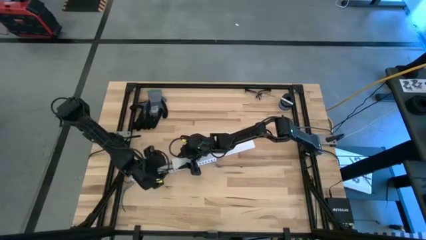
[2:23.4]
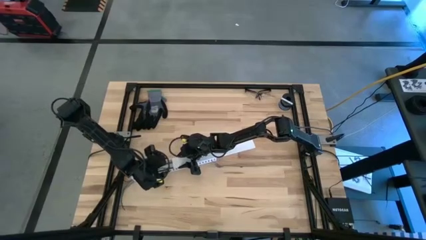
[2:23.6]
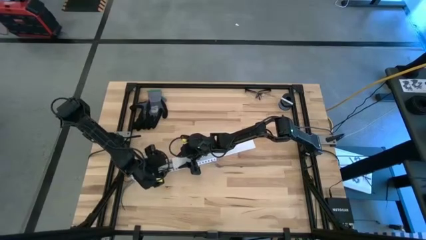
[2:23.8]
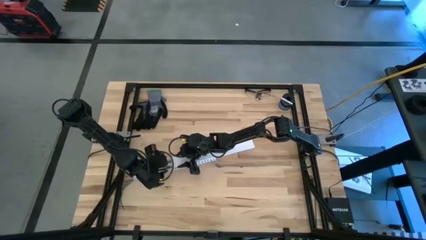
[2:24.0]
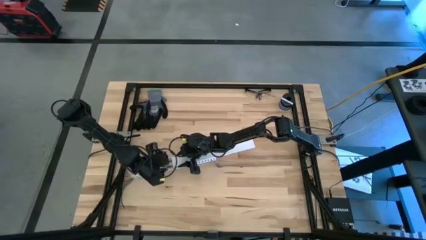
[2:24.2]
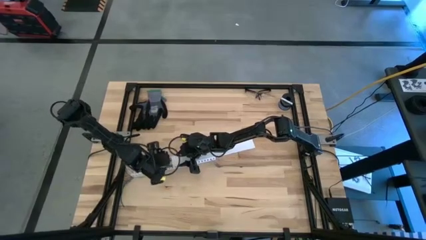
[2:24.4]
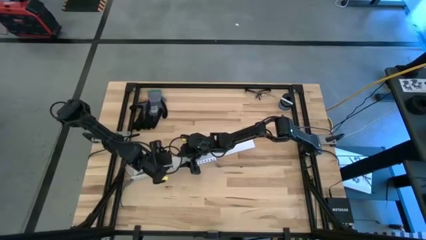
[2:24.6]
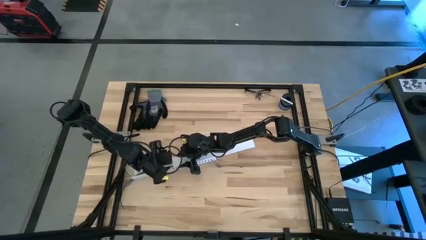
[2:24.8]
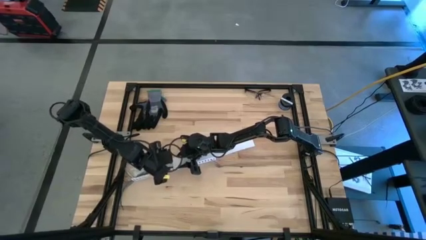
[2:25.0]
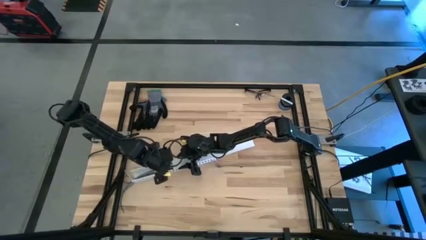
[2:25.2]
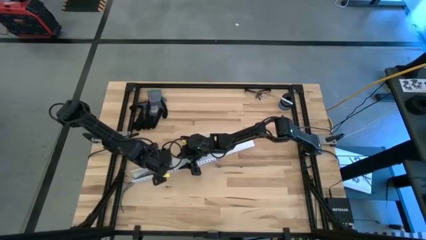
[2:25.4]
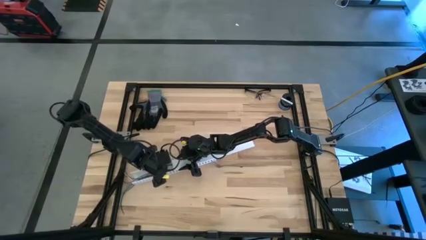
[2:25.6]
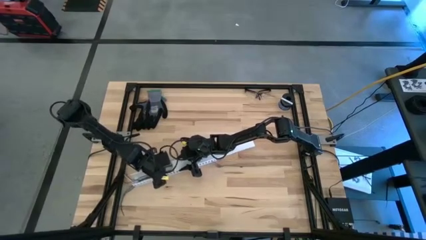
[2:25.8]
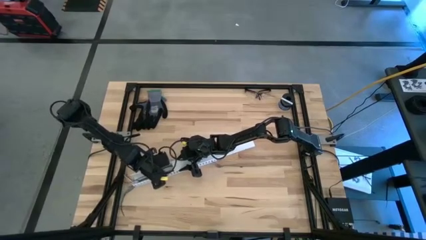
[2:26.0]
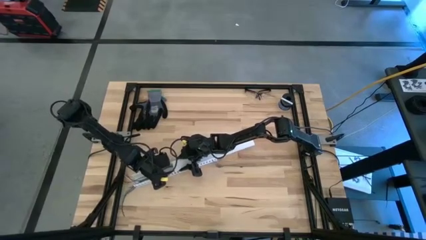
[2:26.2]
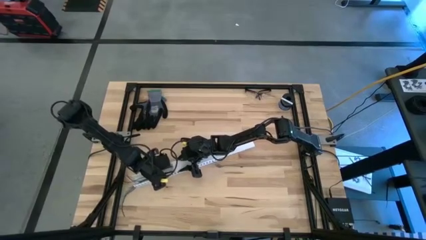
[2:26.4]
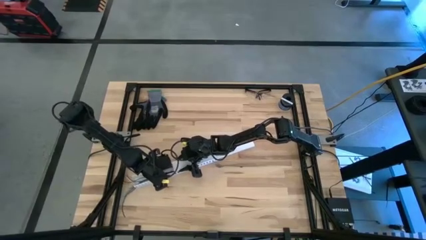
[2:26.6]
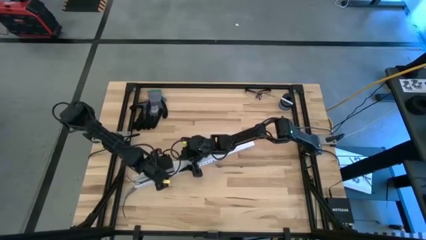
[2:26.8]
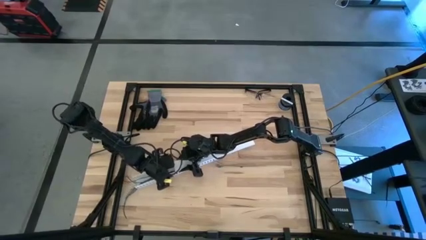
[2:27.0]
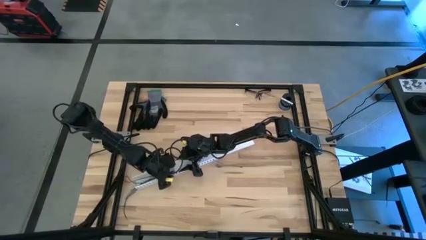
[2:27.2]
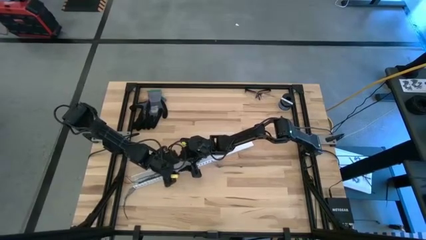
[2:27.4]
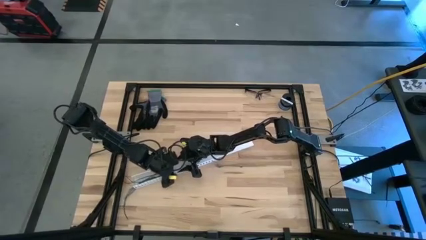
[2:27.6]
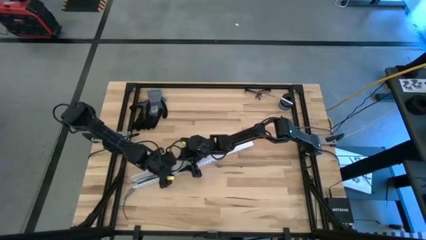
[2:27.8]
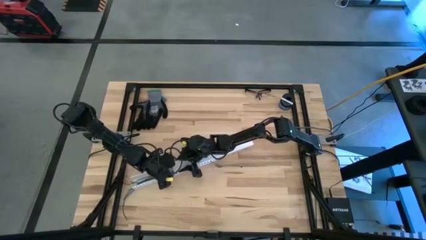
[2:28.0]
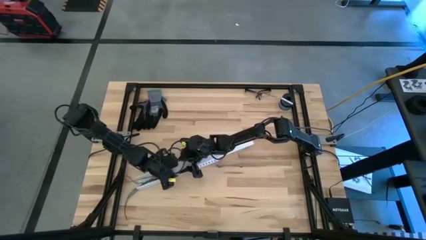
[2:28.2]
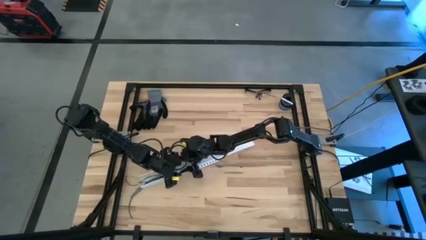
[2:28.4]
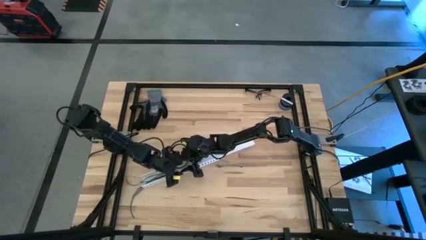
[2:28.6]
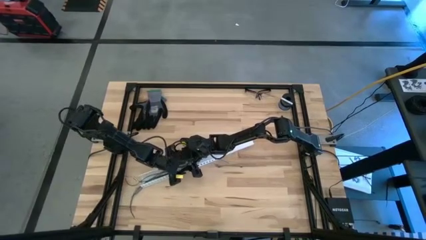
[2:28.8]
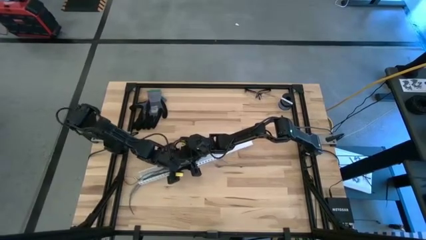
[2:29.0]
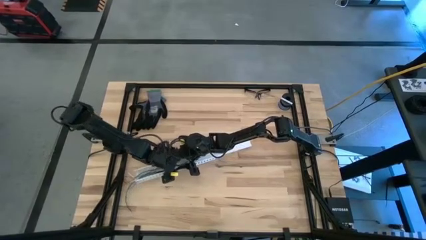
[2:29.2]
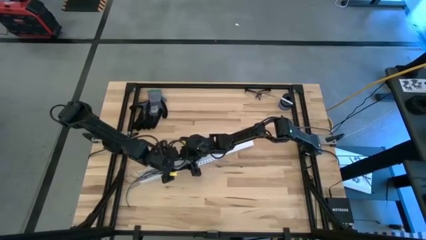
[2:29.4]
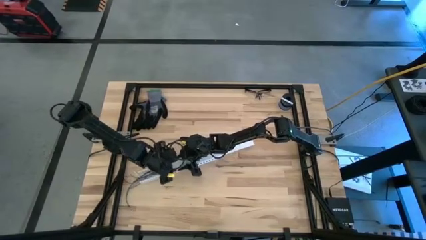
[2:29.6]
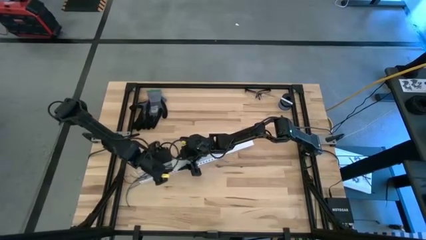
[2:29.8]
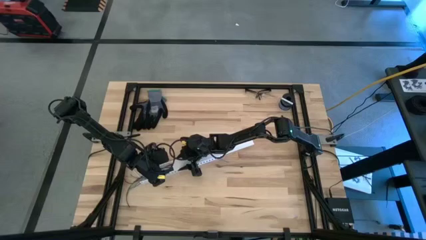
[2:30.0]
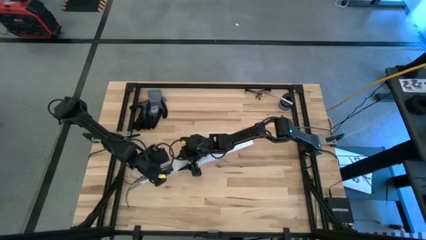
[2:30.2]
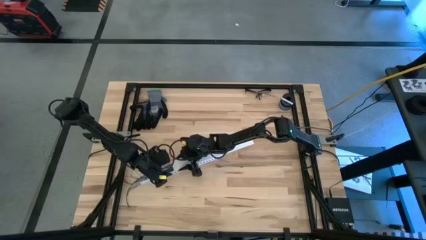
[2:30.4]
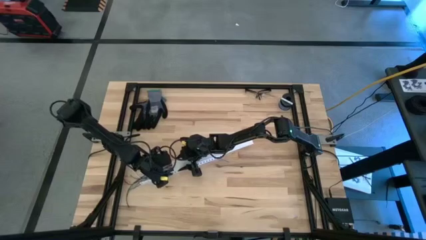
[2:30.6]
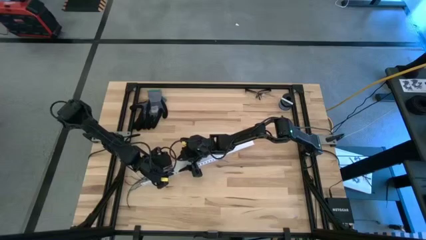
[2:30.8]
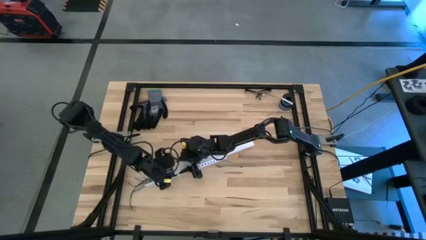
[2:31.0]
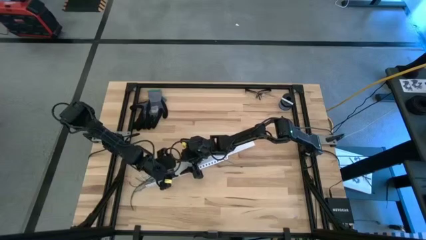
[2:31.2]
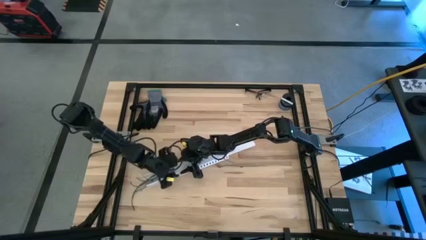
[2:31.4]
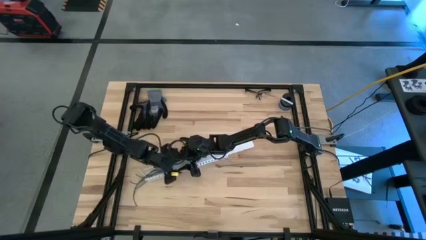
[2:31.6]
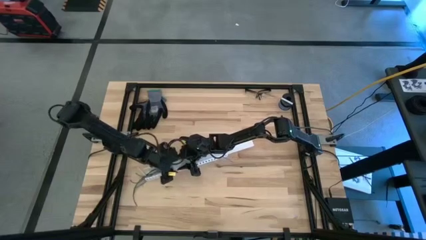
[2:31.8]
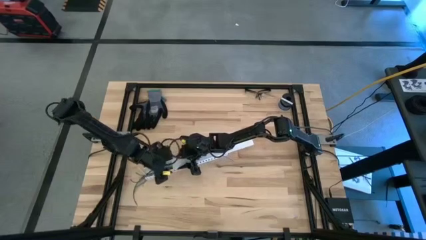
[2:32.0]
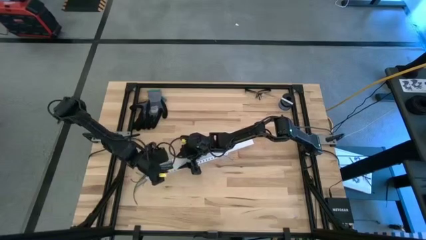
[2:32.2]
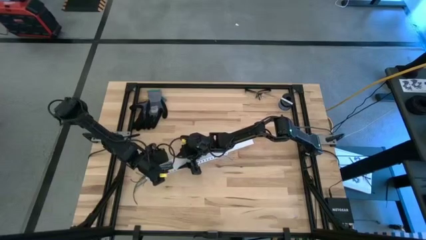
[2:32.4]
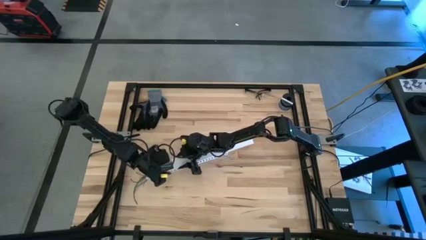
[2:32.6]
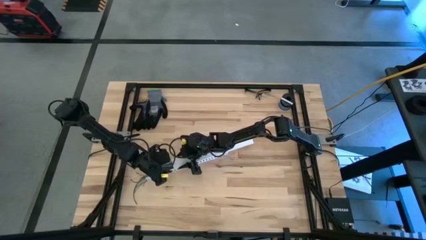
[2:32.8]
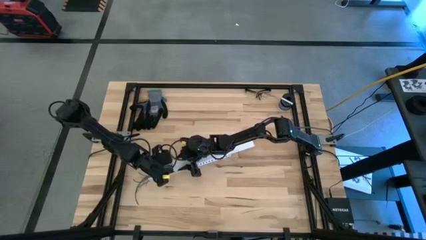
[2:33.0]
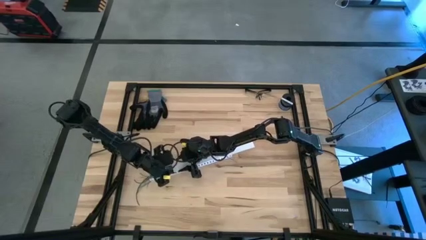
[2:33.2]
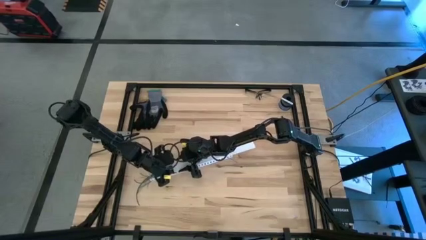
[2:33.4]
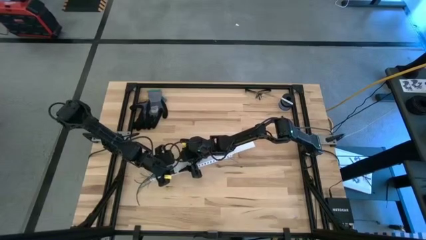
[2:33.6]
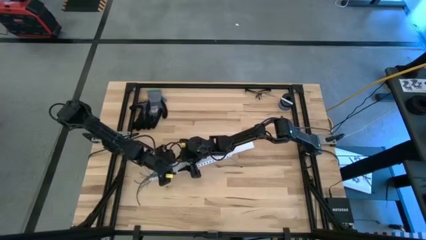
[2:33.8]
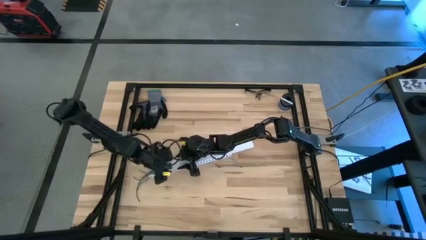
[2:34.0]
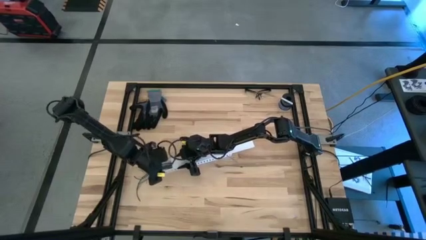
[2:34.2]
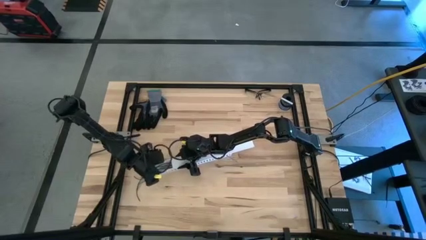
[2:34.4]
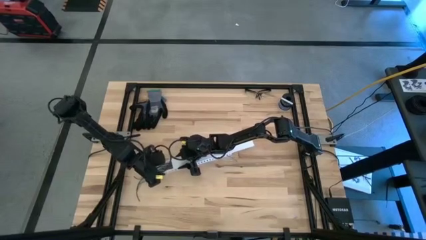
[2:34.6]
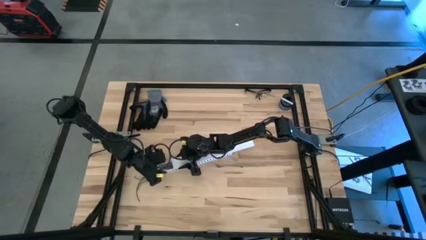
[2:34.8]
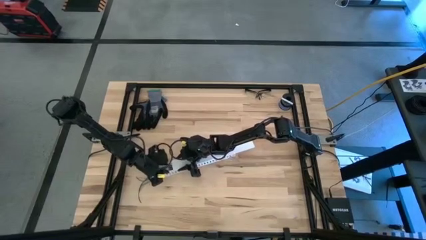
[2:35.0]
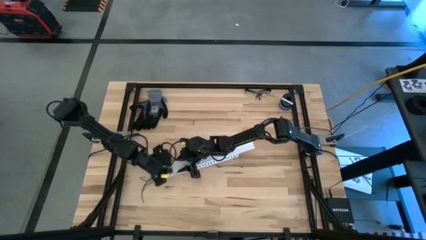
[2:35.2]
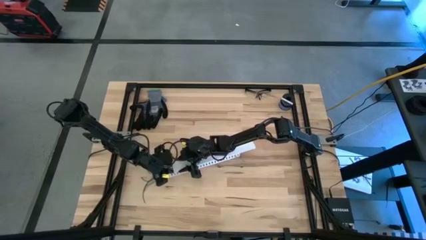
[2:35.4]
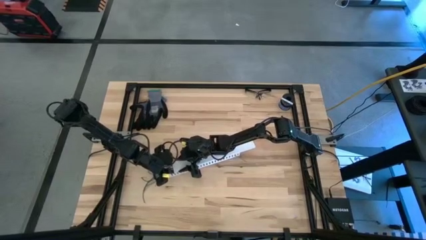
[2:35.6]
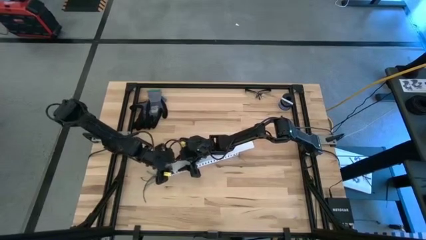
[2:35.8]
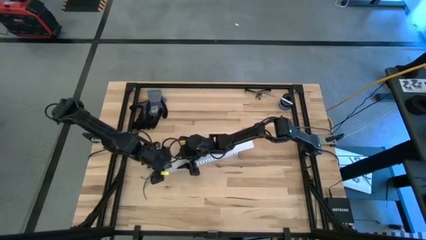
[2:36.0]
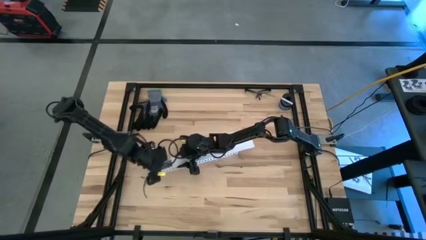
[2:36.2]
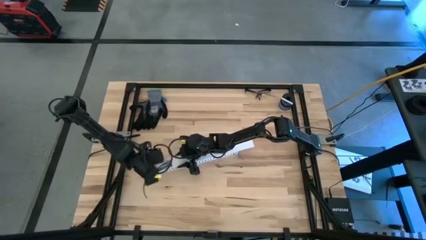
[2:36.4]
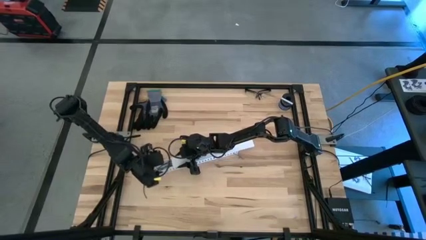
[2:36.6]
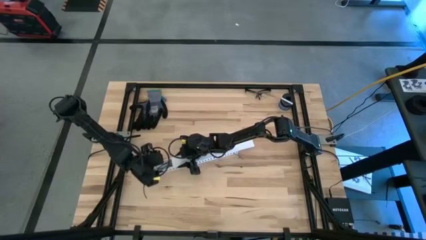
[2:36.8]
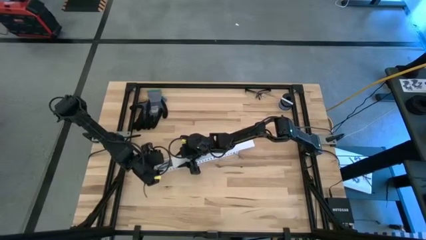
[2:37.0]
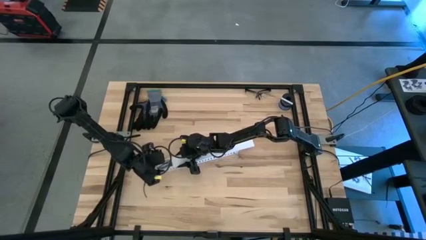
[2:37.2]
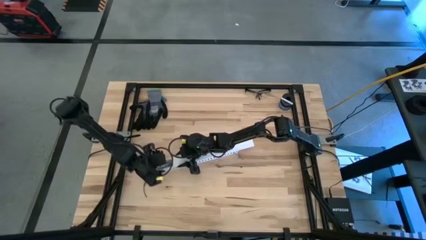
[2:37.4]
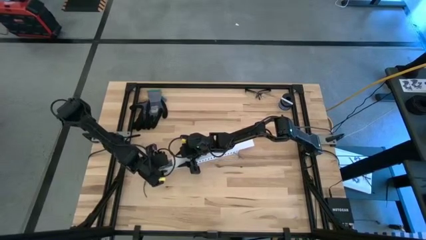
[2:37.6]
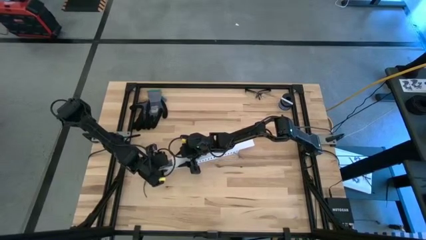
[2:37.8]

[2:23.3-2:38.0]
Task: Ziptie cables
Close the white cable duct

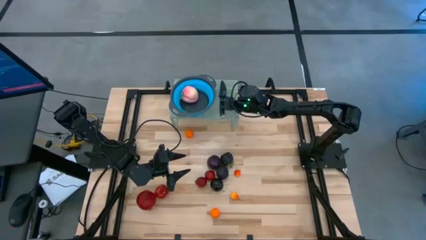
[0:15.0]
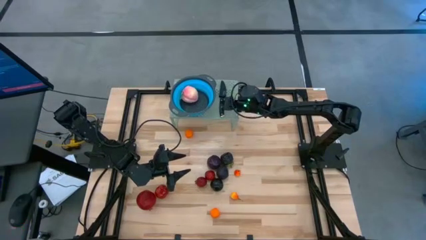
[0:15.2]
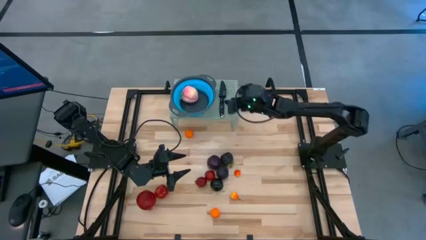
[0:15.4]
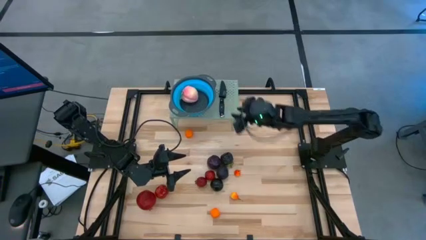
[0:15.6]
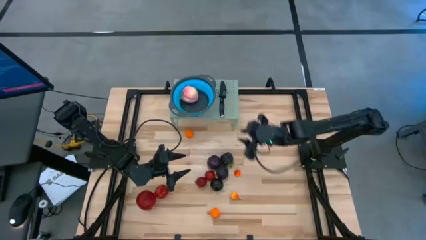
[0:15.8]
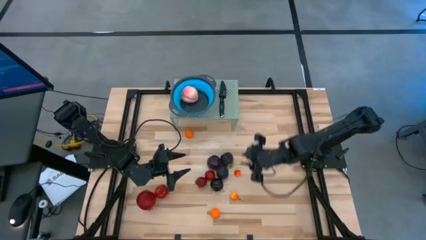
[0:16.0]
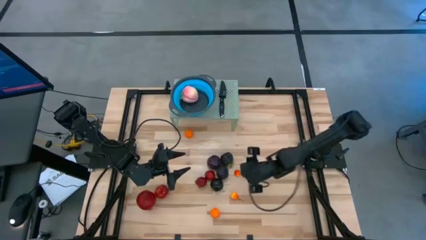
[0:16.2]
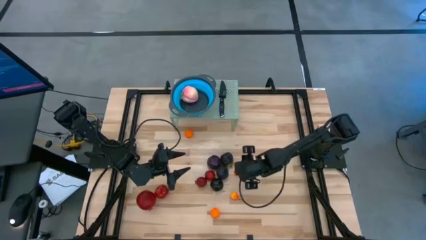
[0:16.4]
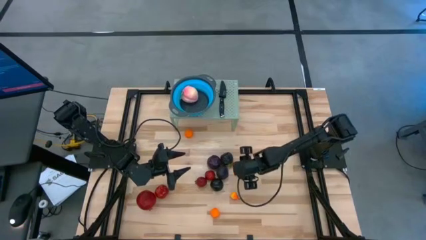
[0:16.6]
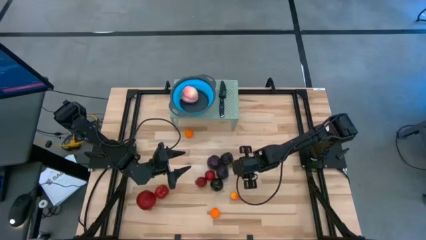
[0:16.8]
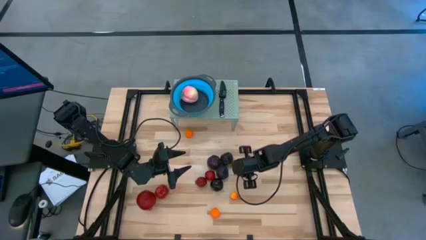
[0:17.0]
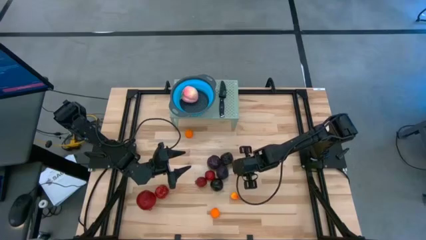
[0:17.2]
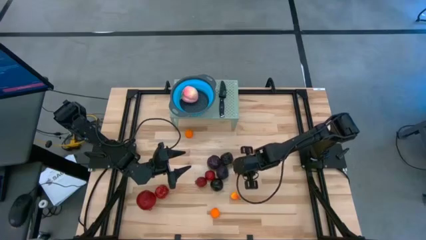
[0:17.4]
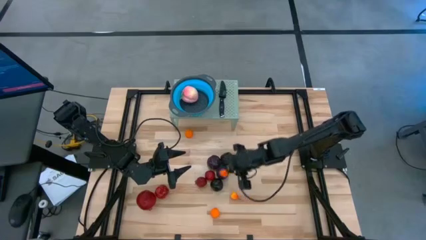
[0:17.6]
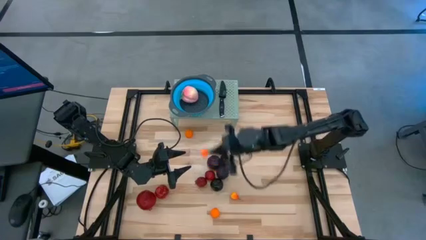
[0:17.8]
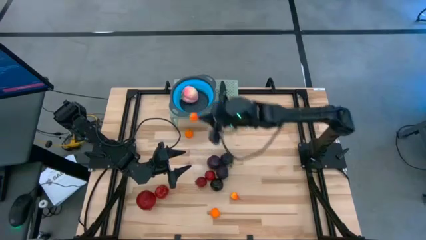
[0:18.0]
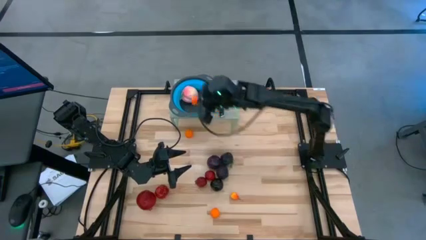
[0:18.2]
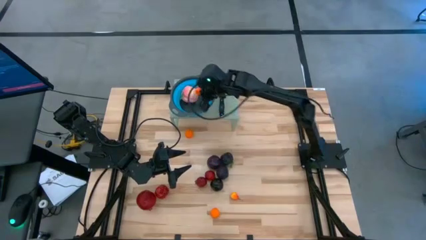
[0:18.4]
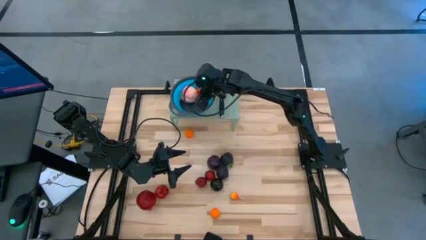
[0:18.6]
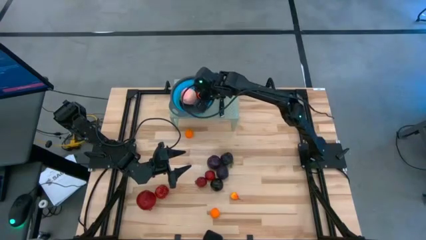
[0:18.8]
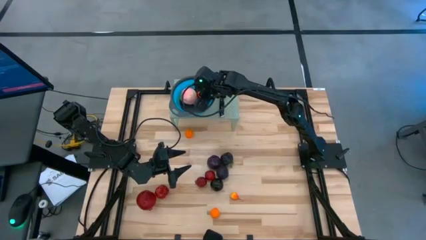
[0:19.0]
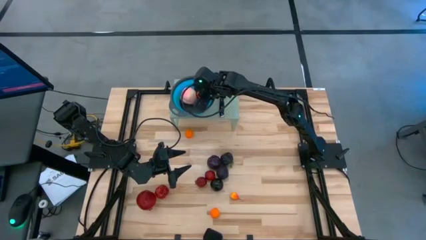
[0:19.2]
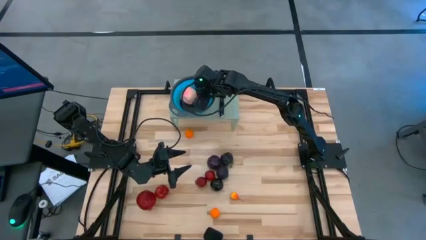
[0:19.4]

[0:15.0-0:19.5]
Task: Pick & Place Fruit
Put the orange pear into the blue strainer bowl
